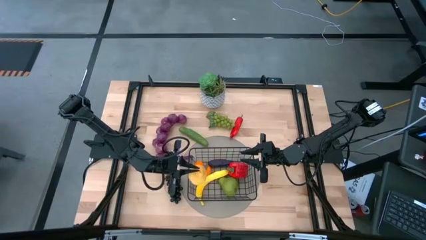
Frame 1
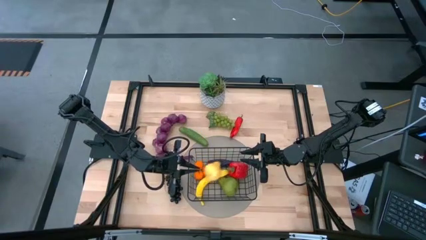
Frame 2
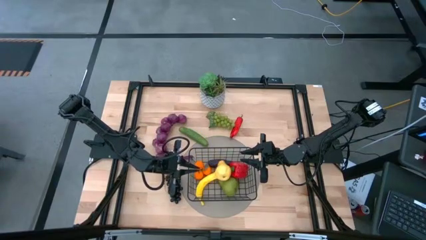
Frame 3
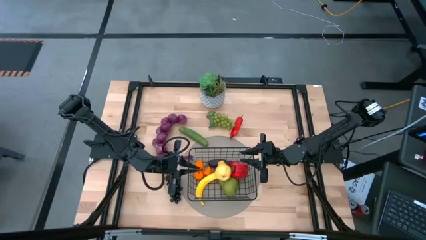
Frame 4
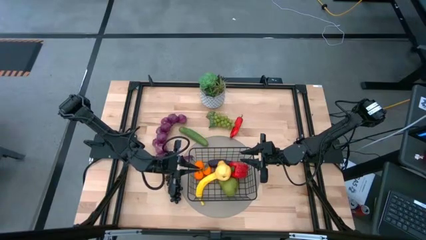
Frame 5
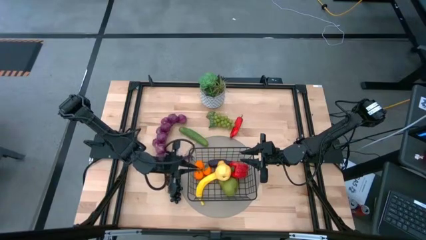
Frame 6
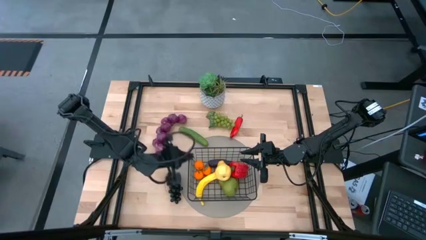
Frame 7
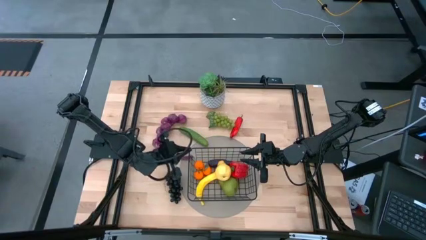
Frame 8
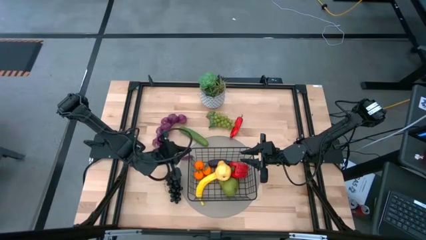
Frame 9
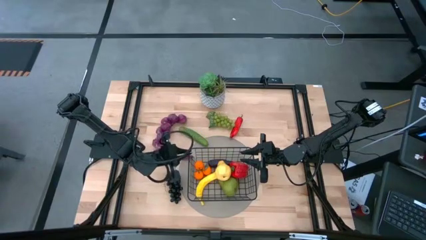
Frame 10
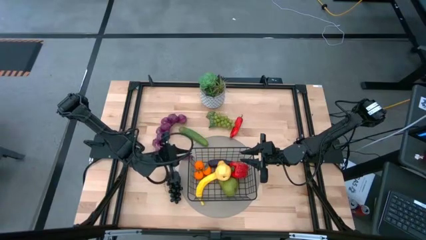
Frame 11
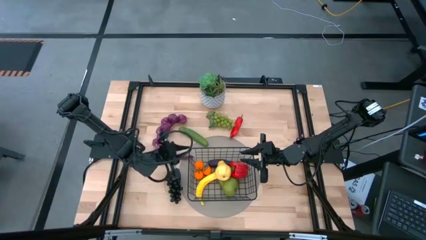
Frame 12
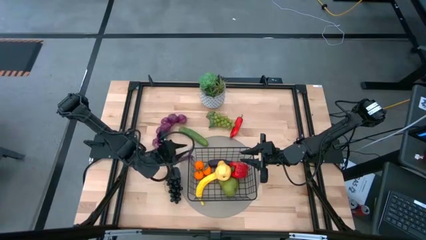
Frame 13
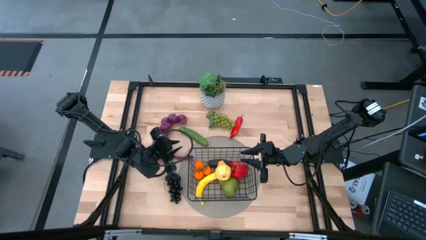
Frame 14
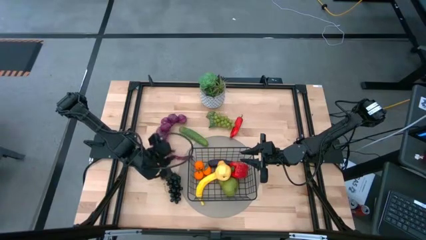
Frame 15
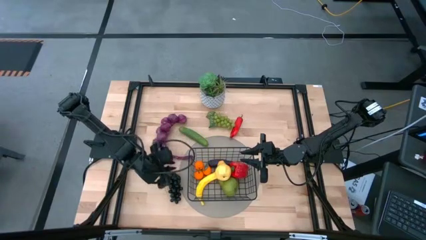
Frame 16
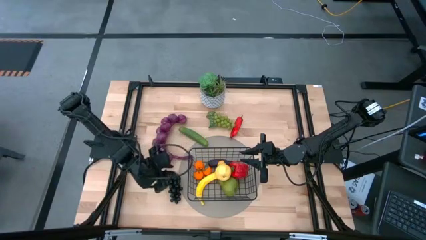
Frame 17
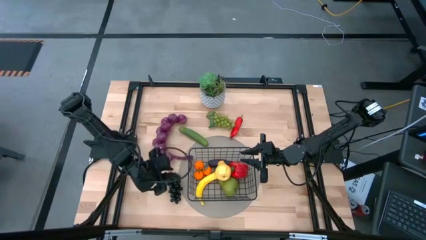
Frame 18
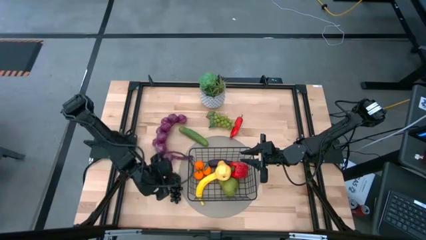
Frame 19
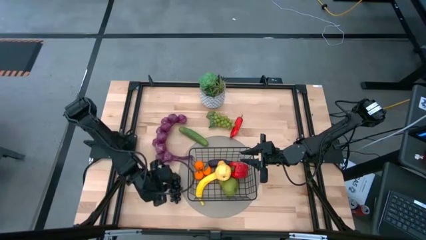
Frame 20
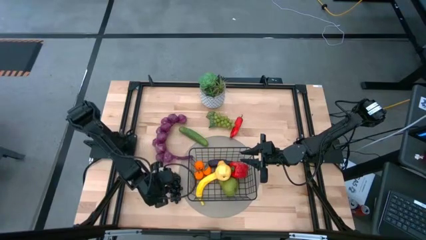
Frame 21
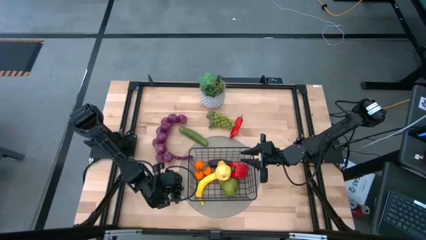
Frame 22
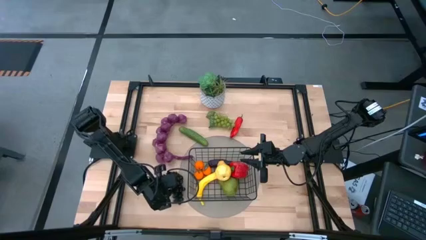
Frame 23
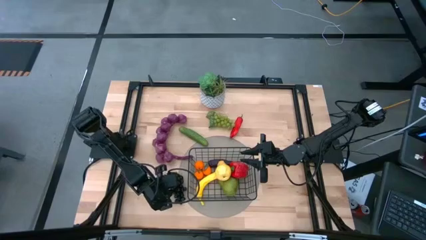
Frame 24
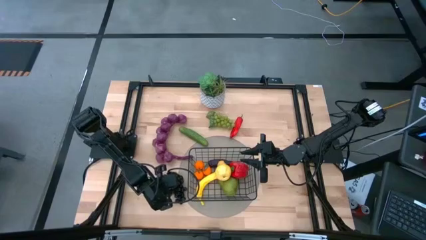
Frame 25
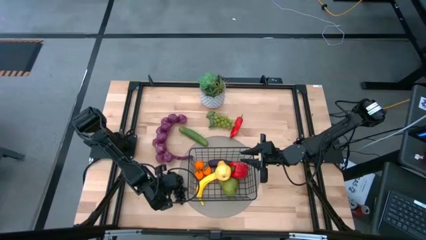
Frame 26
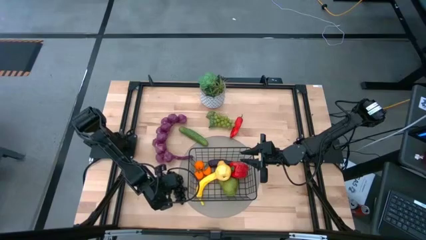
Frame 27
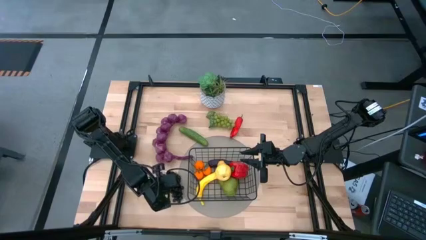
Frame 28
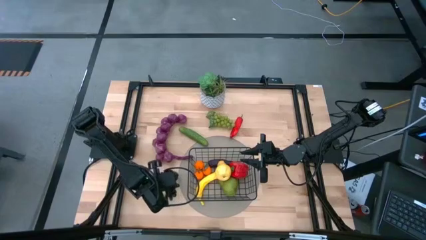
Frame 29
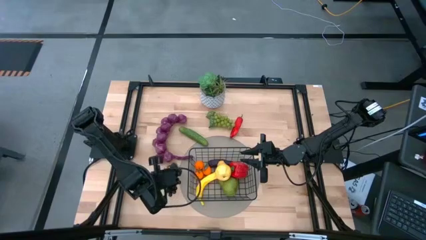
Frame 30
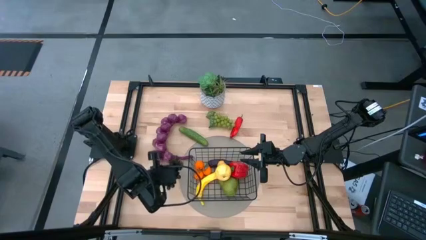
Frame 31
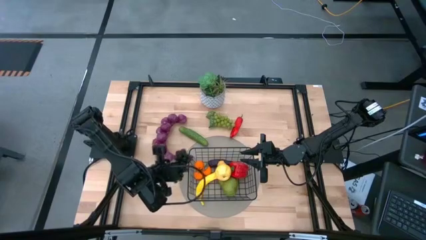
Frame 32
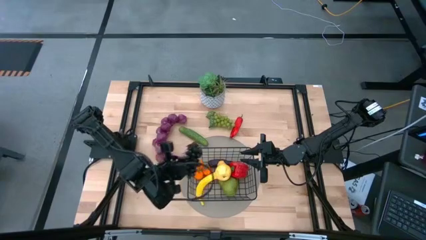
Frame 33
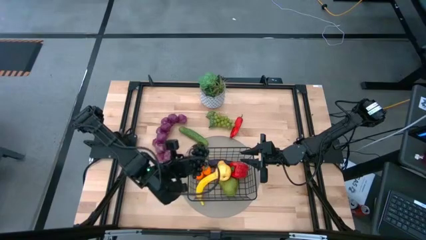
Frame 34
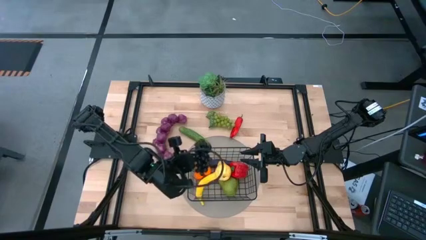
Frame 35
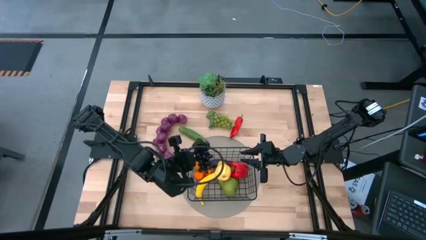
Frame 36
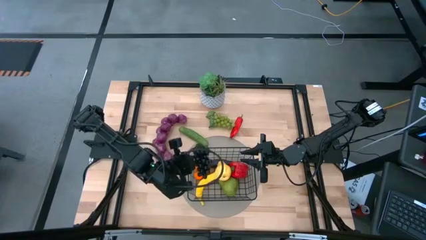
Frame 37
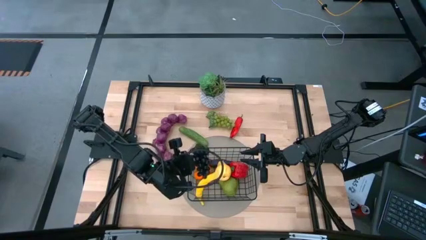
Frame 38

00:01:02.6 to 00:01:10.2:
Task: Build produce basket
Put the purple grapes into the black wire basket

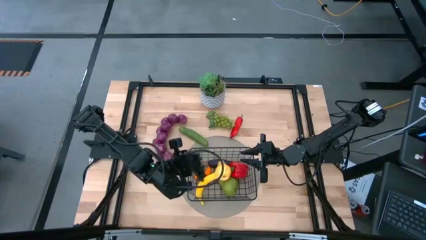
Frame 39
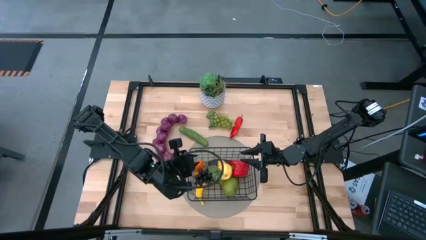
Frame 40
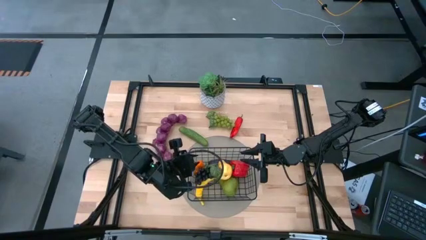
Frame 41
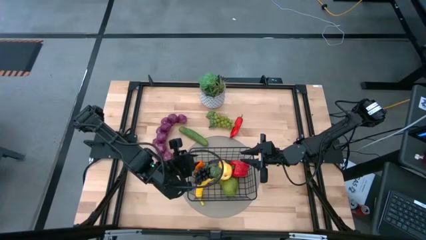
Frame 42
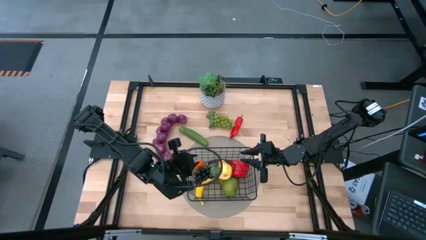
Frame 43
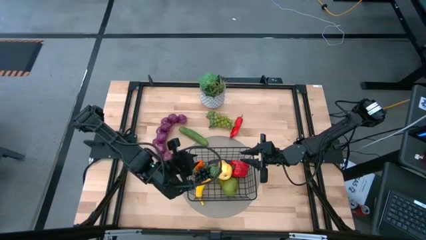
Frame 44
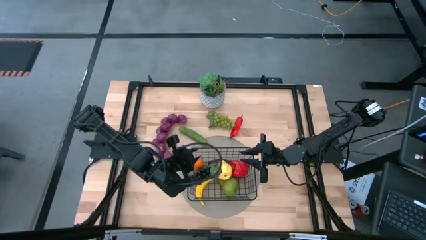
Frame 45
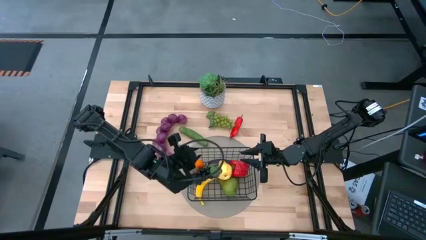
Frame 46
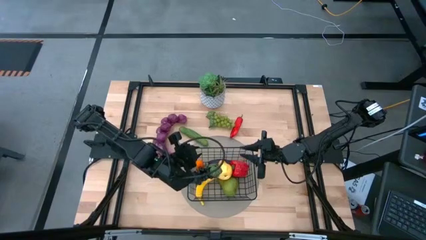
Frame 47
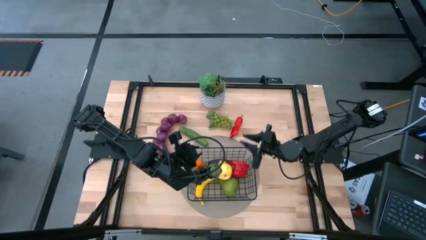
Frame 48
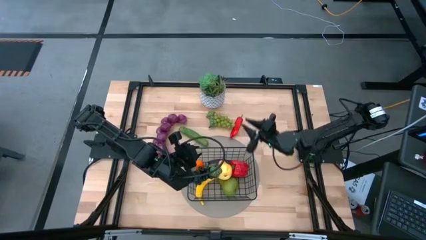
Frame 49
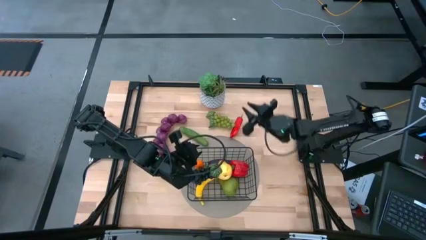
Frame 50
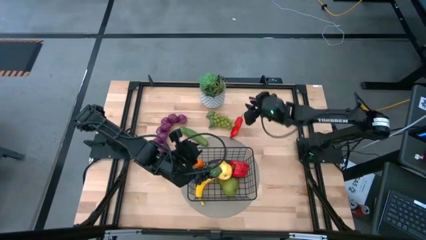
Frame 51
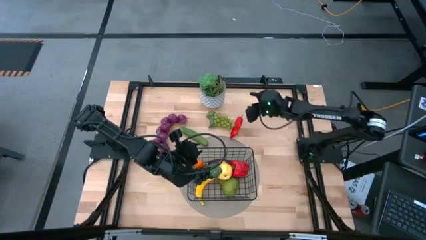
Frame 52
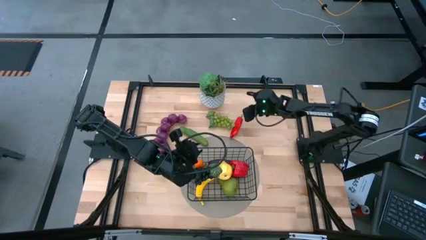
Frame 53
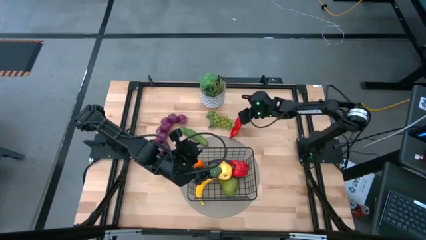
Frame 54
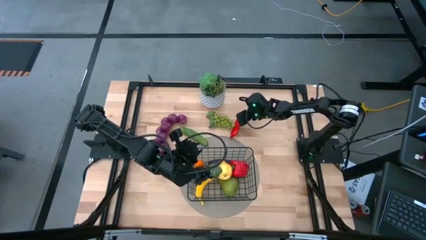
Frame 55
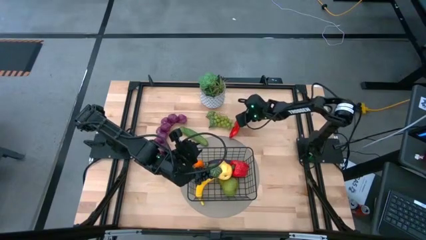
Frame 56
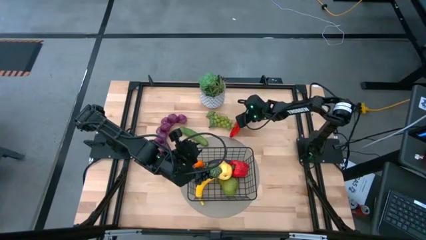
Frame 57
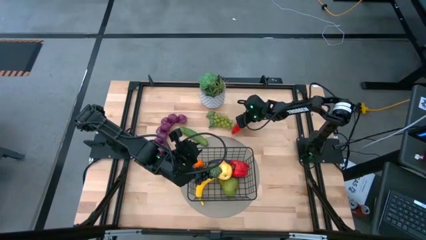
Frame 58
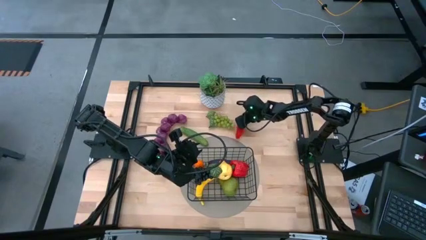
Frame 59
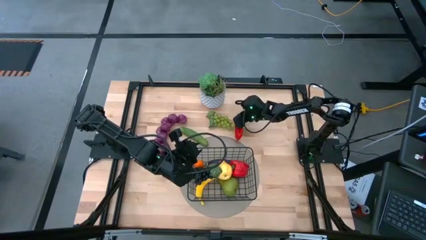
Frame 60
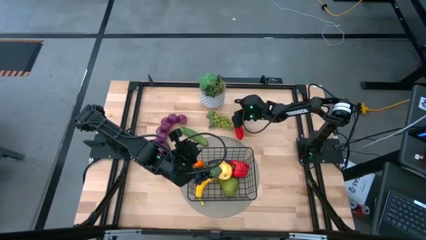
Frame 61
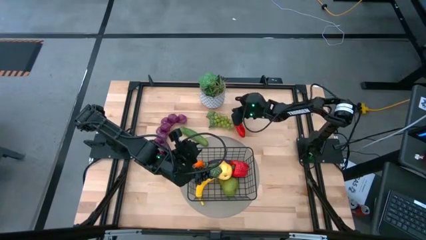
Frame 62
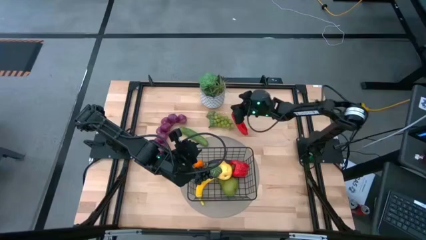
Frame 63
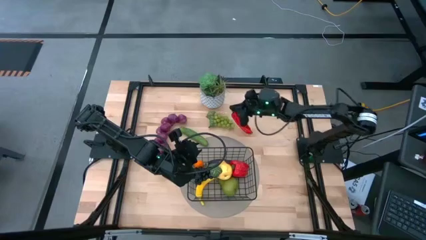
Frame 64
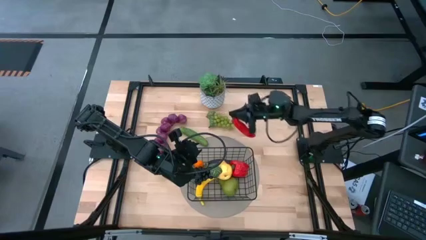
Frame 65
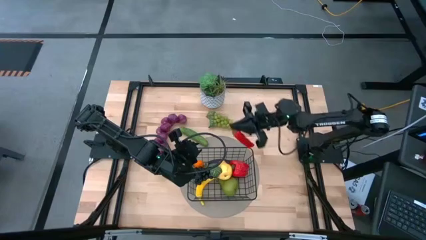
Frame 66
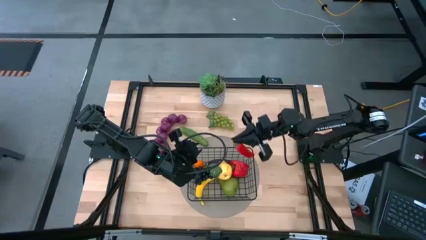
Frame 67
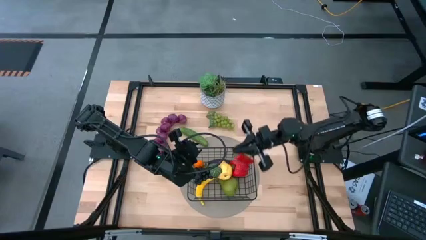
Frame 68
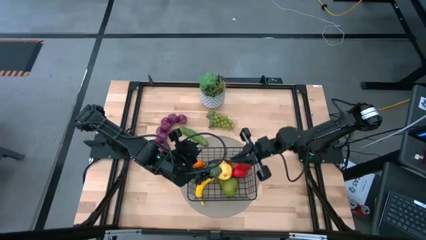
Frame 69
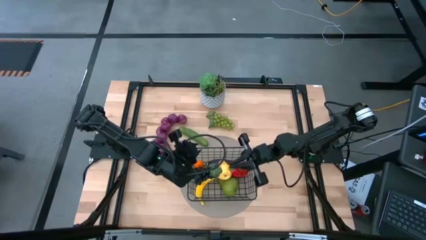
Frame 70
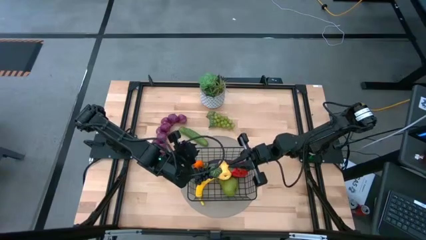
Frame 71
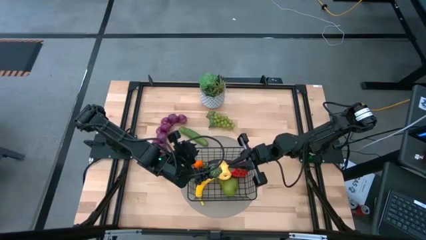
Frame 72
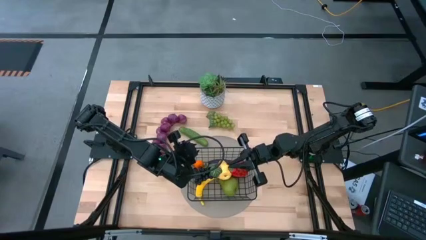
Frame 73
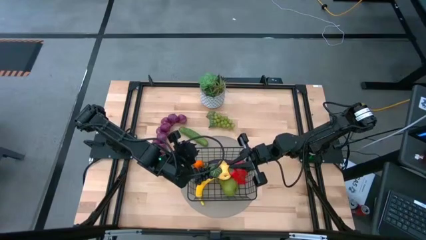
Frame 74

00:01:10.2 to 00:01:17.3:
Put the red chili pepper into the black wire basket

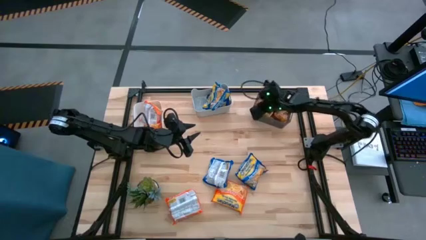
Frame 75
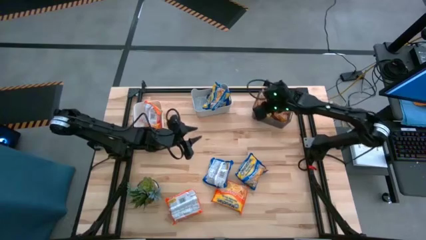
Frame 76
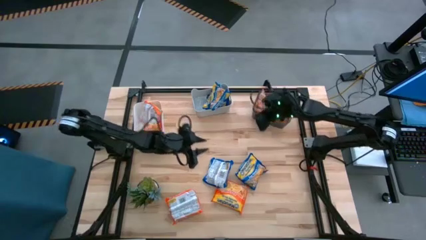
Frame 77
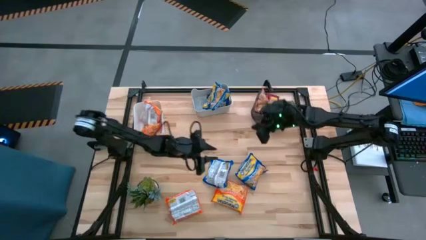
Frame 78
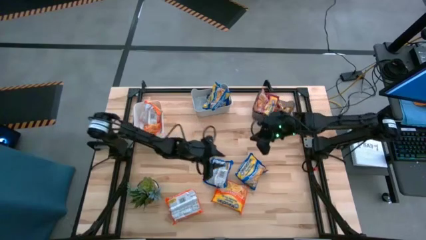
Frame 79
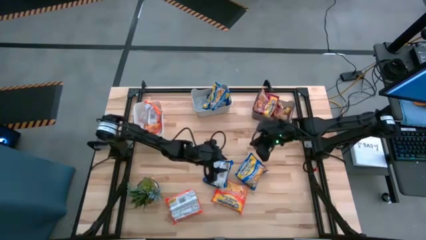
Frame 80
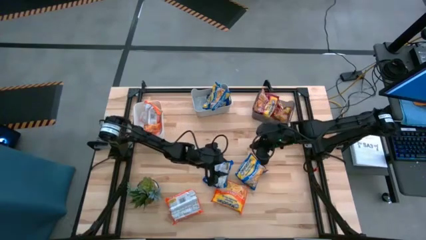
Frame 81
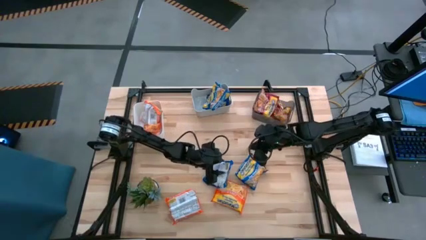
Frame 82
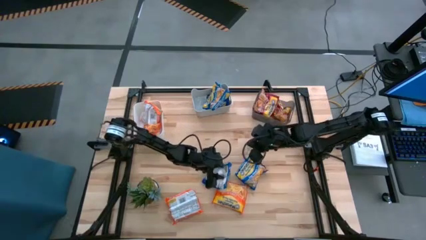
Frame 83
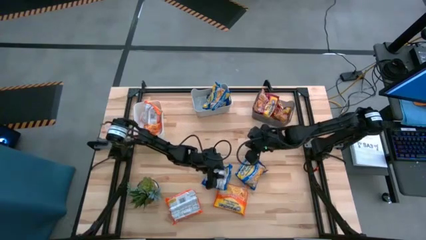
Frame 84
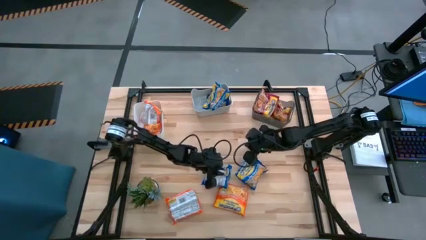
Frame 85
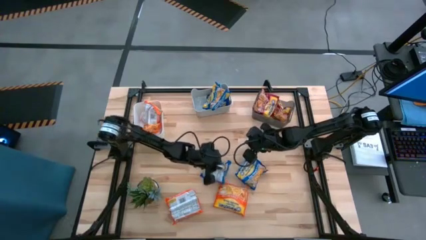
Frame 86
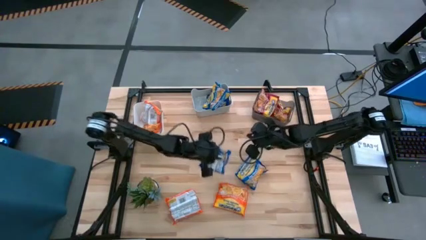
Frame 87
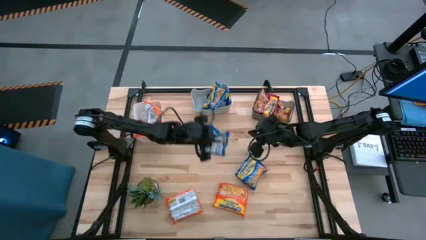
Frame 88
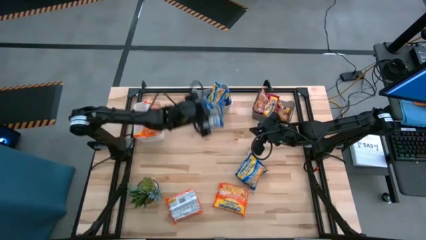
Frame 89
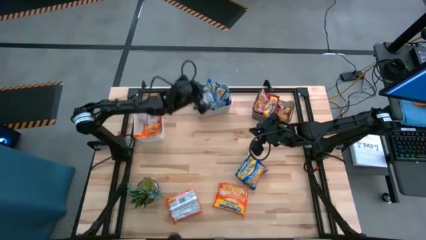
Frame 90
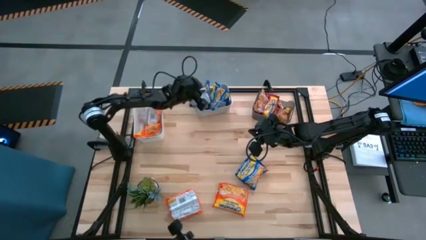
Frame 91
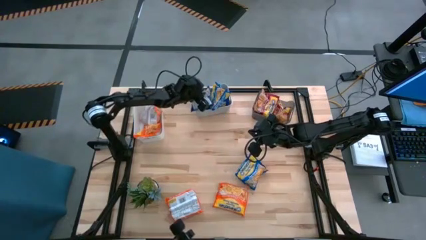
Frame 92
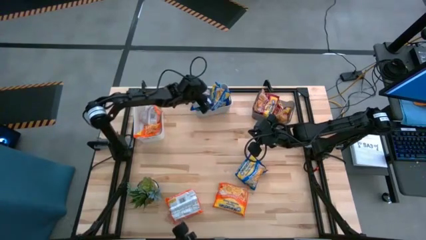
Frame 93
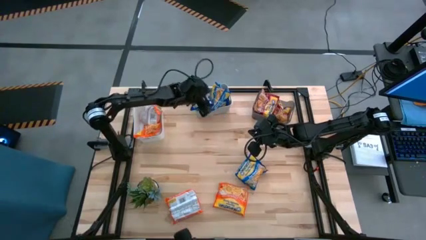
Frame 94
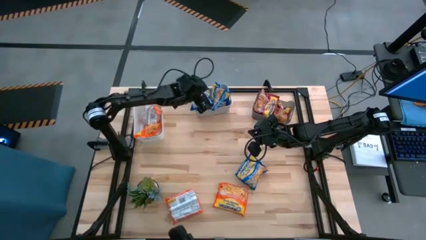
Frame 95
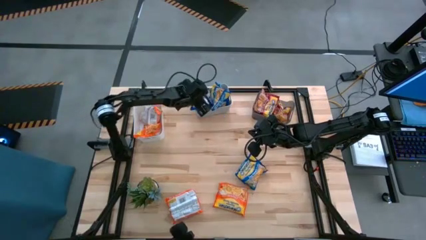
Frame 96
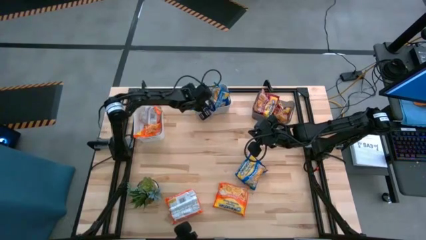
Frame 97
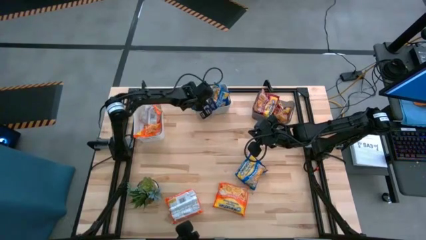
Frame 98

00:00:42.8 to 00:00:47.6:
Task: Sort Maruchan noodles
Put the middle blue noodle pack into the gray bin
